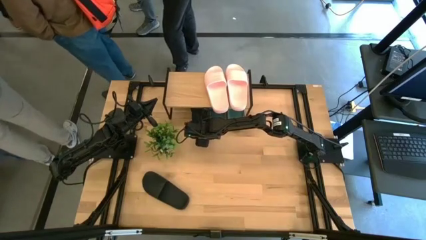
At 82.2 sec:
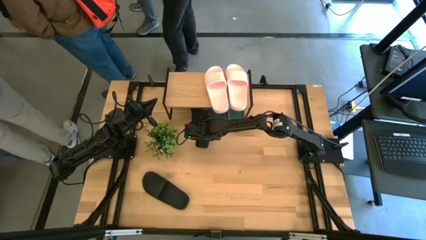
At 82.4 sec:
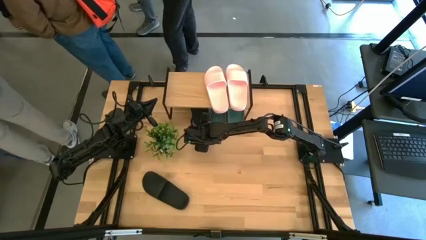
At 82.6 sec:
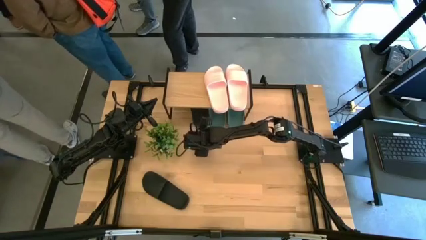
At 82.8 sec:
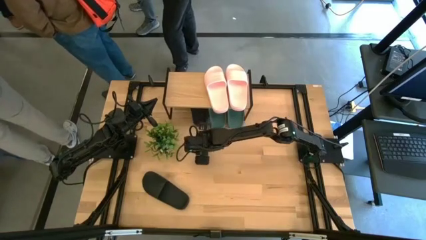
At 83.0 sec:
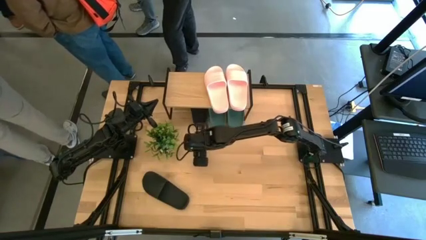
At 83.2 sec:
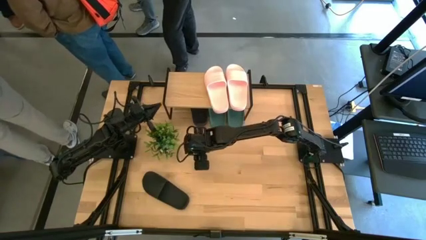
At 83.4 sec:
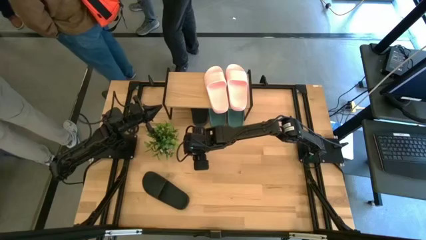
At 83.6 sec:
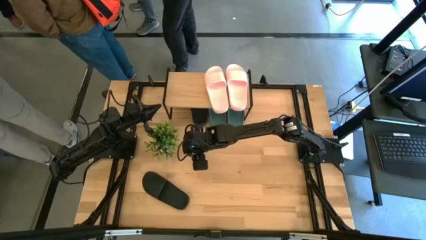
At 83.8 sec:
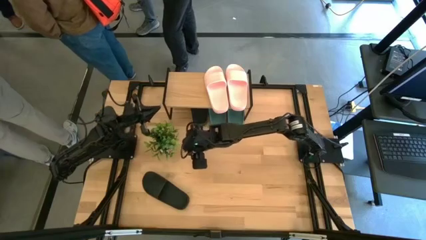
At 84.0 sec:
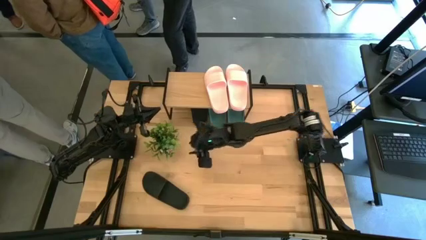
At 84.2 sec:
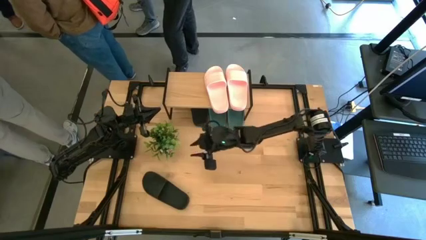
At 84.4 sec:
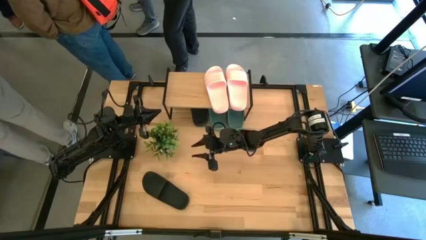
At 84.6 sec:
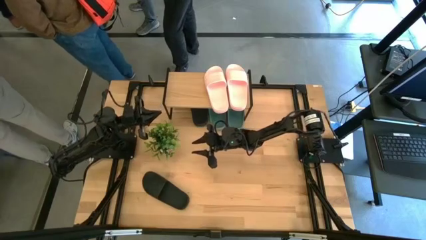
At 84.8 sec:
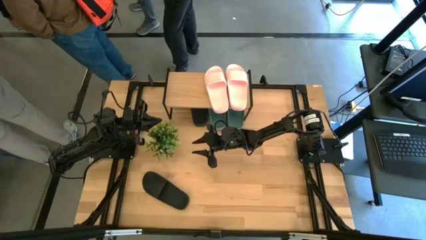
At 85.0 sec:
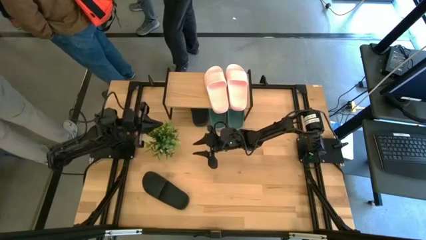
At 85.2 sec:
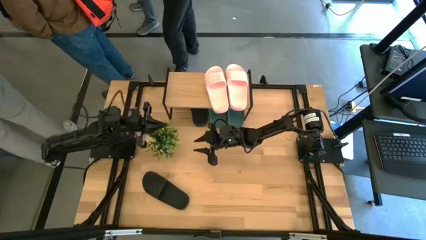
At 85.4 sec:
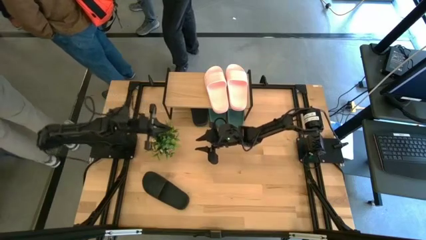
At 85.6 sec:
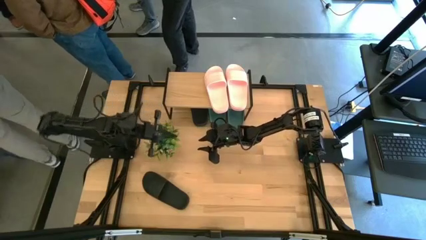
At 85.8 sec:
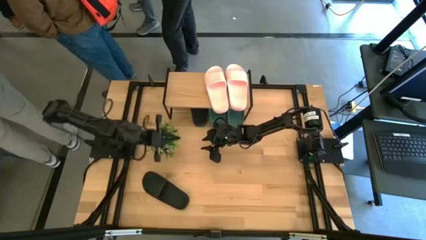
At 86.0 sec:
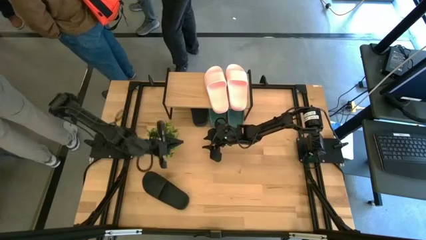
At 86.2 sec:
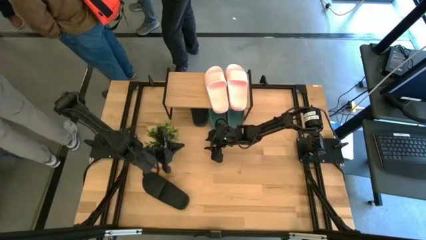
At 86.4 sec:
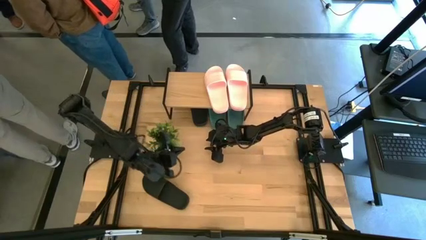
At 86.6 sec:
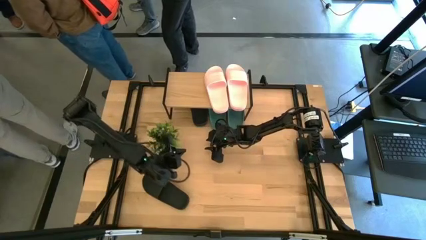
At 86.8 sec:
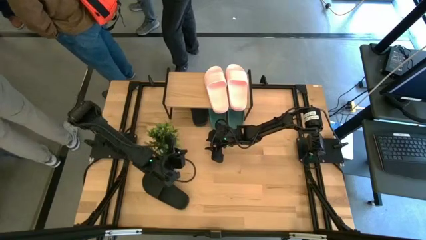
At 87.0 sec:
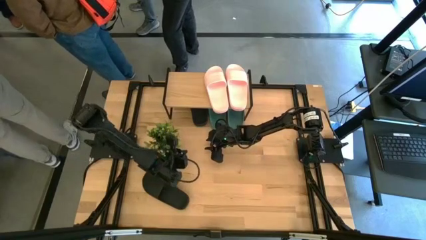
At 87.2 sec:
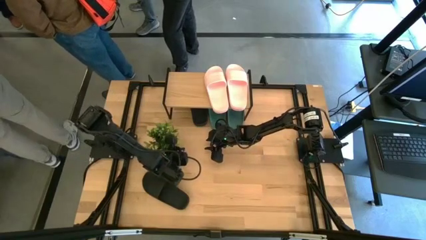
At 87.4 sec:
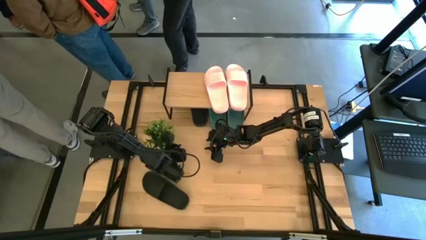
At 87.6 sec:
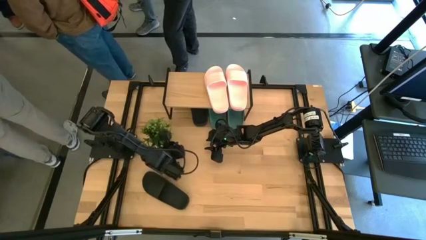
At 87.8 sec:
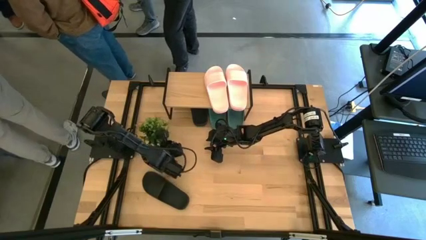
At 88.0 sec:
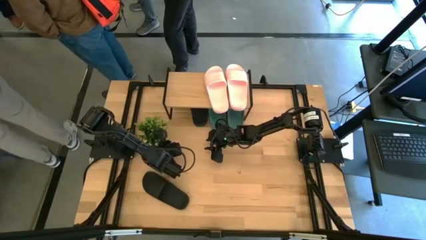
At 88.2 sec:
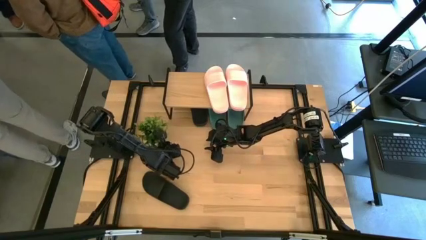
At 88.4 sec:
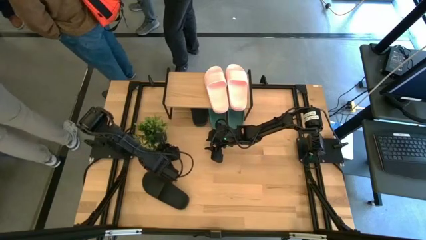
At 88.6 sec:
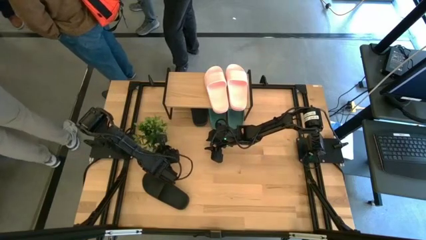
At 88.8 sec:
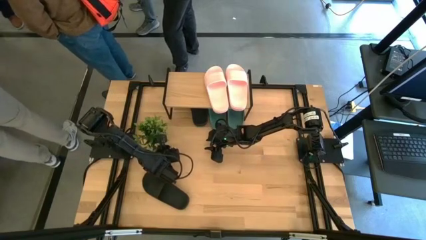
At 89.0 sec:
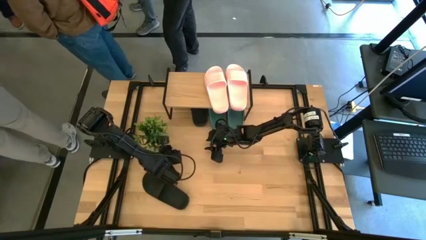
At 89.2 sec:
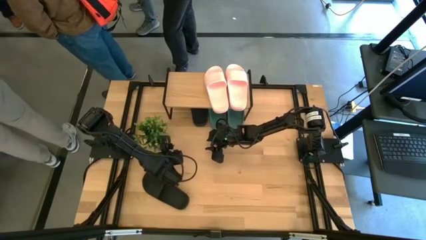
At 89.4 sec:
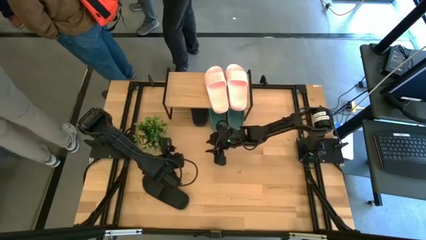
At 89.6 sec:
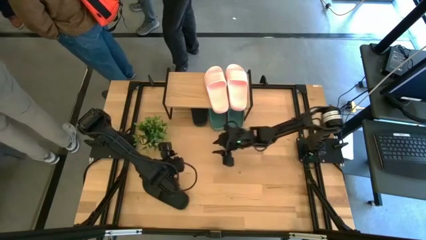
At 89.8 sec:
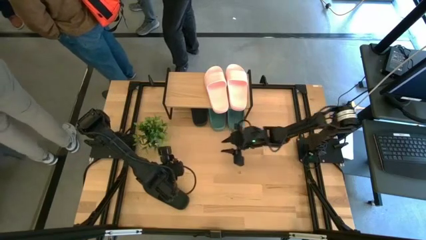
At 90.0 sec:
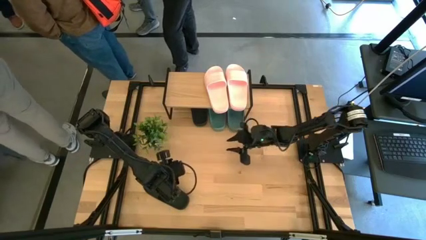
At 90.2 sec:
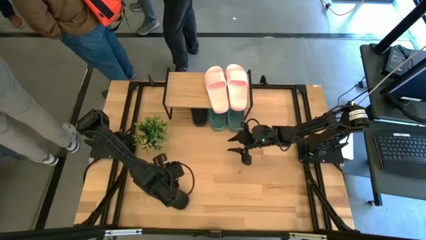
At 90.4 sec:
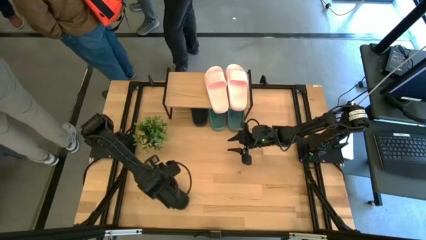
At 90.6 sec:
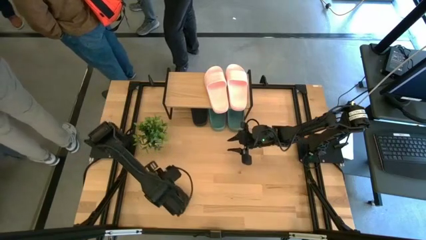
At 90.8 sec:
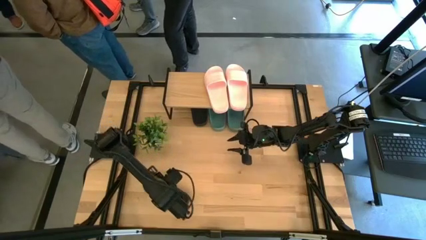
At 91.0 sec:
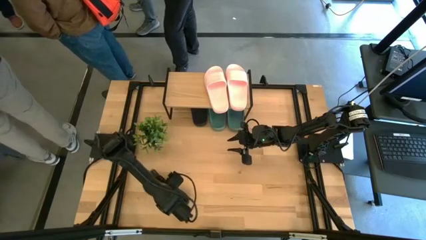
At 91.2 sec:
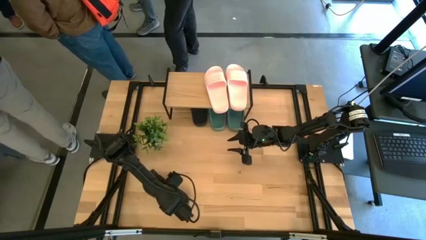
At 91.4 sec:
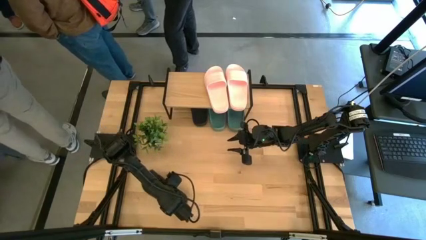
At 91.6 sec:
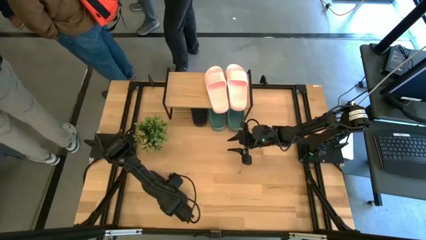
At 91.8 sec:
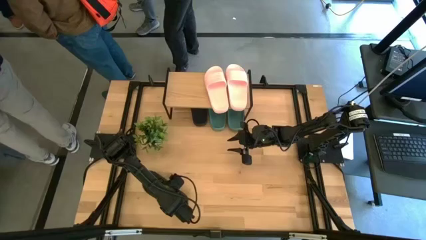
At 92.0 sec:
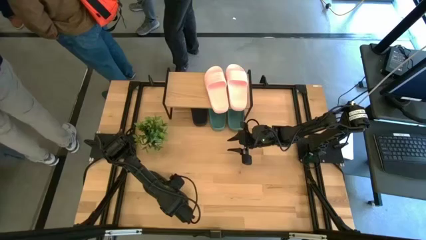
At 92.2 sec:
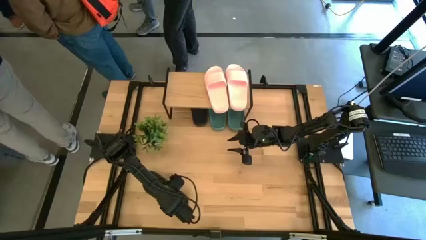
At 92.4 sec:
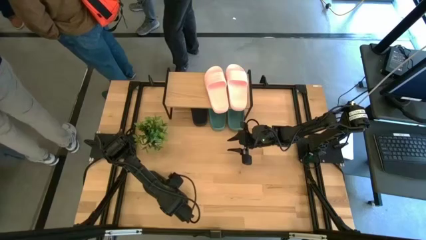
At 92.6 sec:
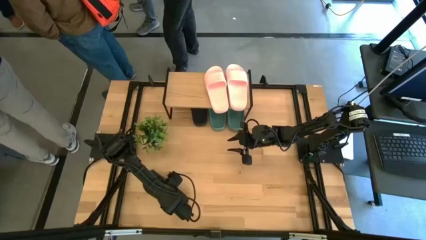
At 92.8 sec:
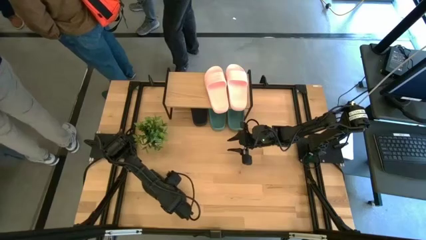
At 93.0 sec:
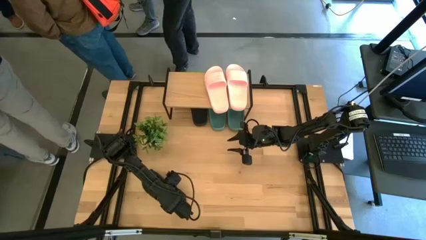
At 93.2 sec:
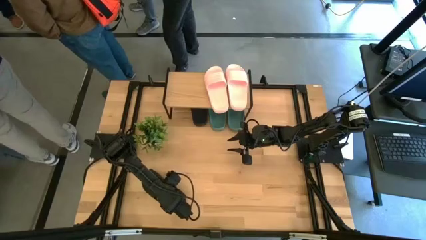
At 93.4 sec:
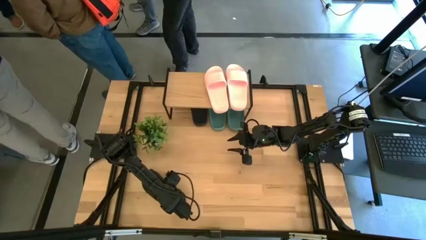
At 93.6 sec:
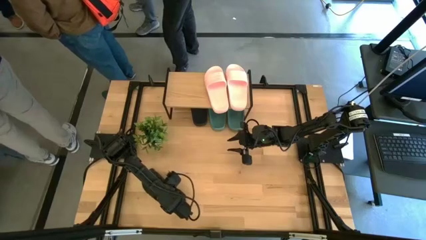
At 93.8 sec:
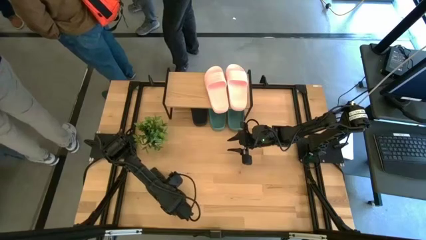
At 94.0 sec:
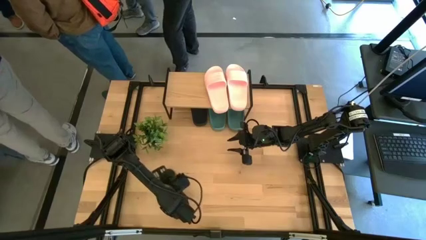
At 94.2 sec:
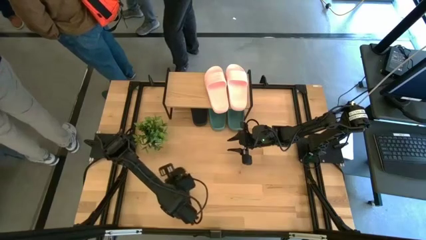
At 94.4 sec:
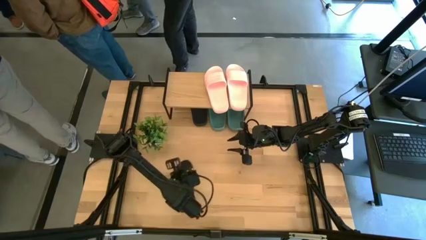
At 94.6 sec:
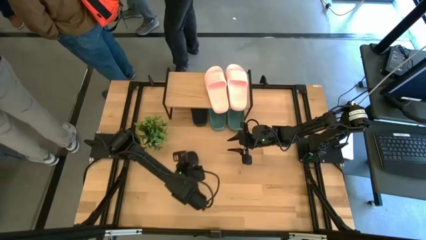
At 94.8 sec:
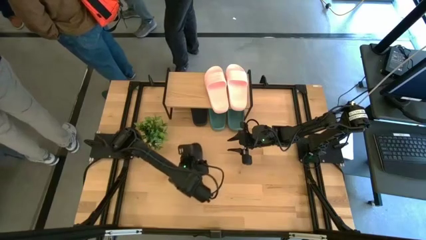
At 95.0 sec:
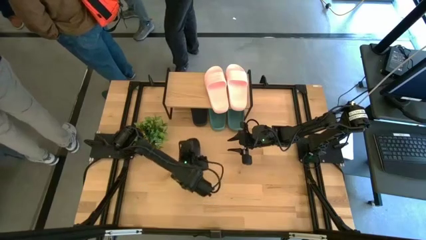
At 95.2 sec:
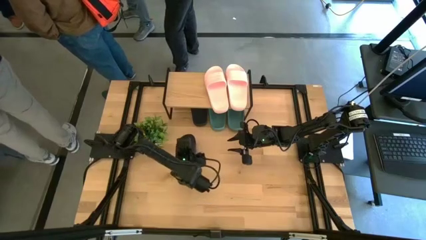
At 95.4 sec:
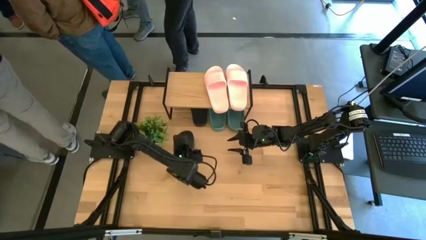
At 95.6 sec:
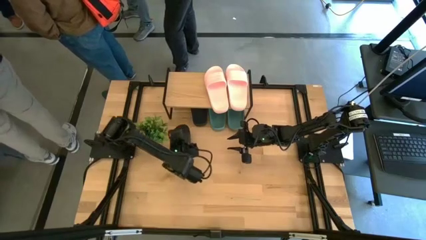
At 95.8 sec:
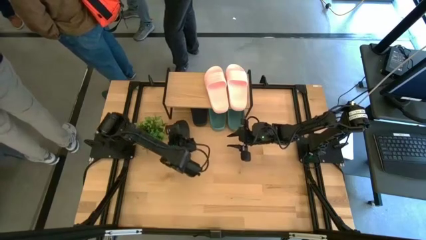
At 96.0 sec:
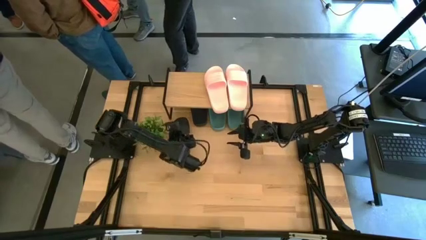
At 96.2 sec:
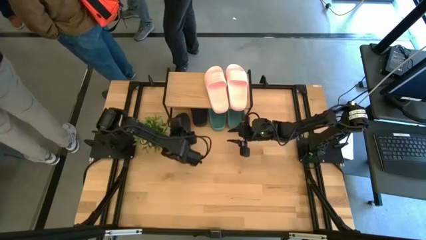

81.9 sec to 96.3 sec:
Task: Pick and place slides into the shelf
Put the black slide under the shelf
